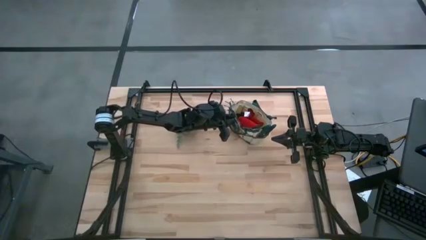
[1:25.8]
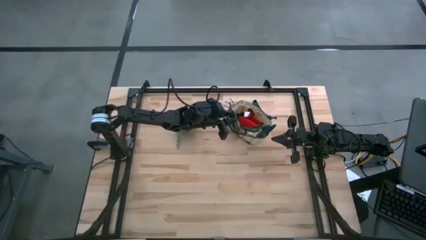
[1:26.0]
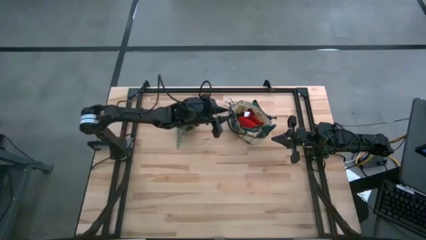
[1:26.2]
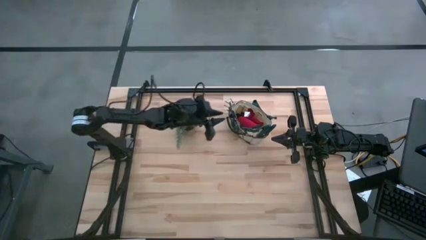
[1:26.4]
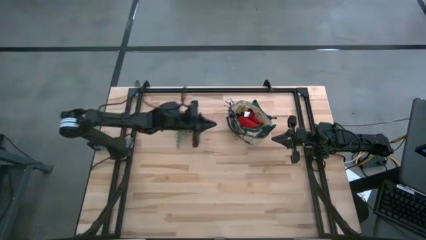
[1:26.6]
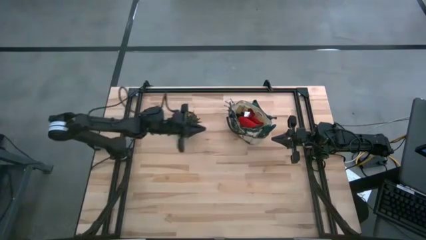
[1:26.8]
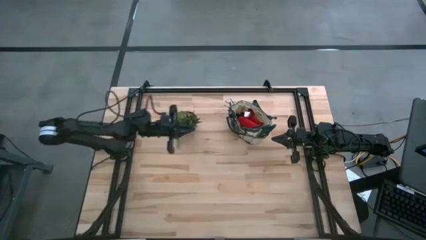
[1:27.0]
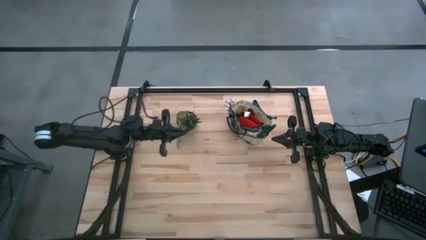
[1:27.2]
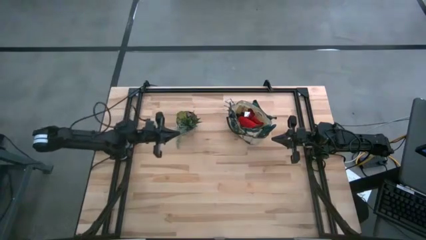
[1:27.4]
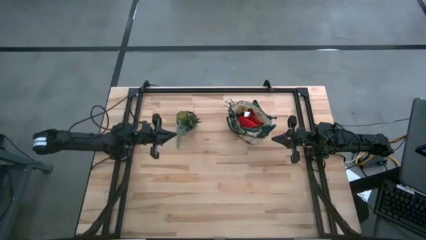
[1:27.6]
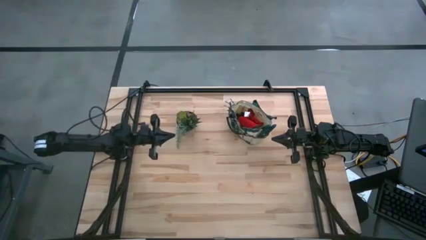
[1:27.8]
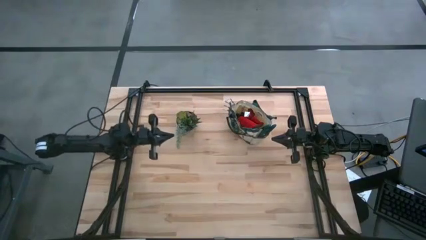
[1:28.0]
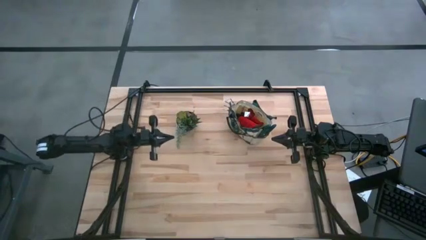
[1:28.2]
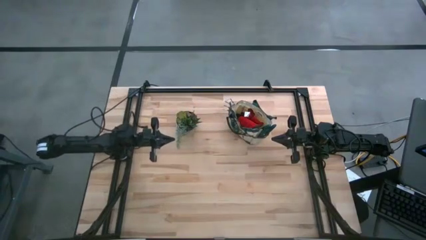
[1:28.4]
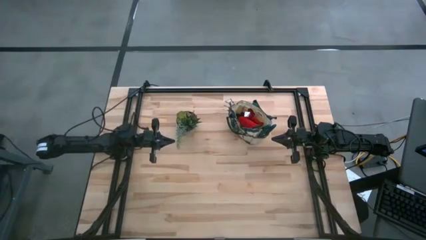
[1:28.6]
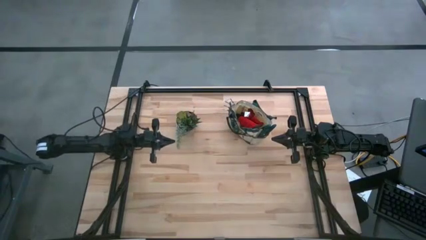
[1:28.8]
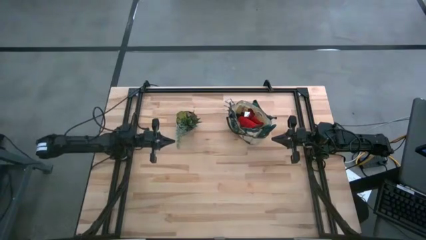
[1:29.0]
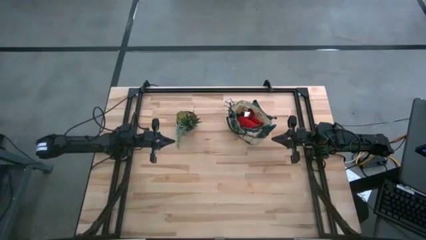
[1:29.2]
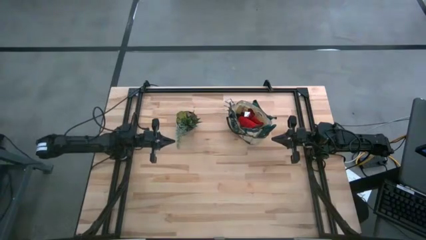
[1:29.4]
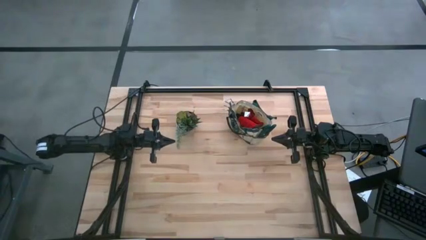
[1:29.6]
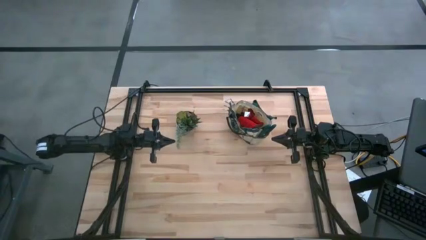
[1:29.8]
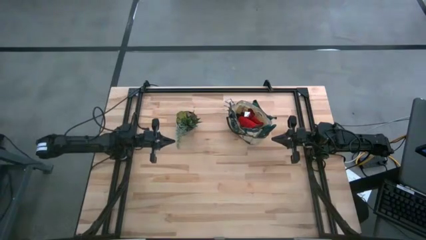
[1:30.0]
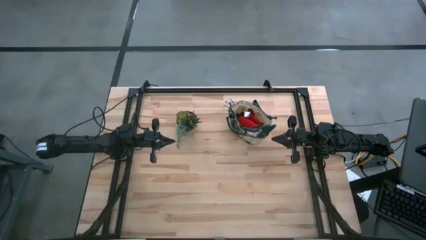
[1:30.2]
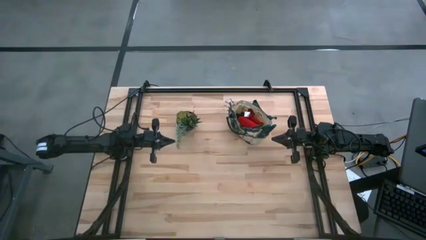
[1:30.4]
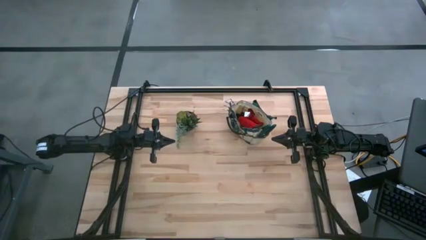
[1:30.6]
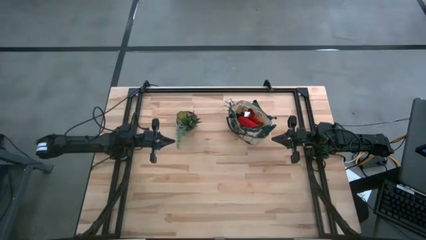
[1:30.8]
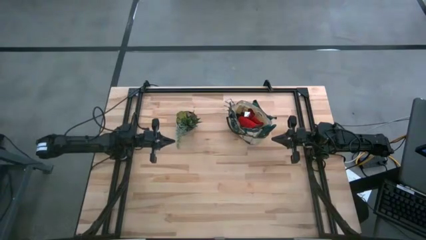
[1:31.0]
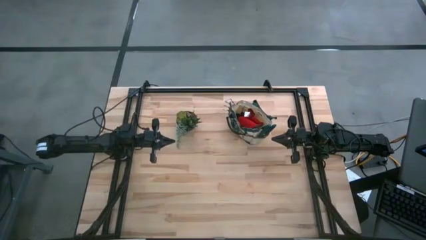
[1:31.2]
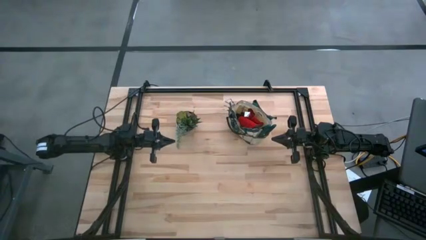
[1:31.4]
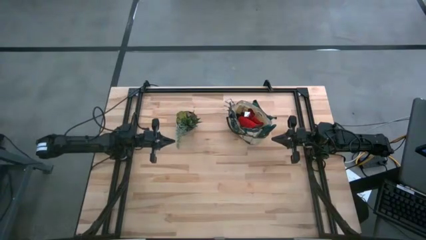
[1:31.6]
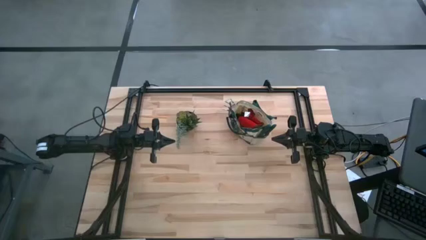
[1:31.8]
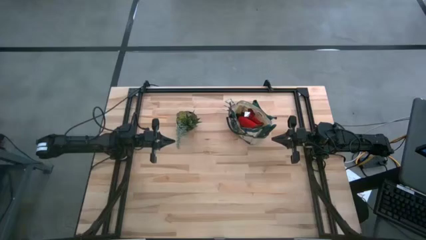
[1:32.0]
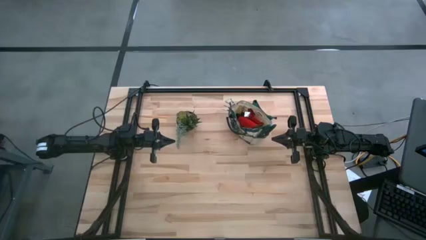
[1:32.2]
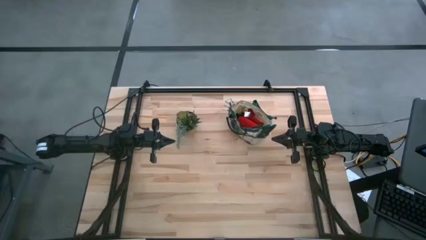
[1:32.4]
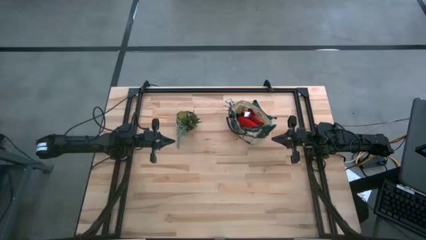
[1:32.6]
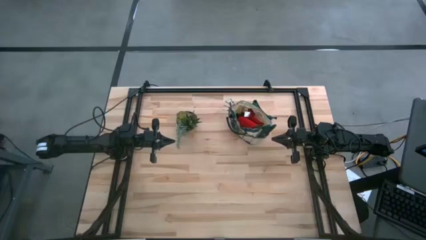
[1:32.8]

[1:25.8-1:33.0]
Task: Pick & Place Garden tools in Gardening bag
Return to Home Position

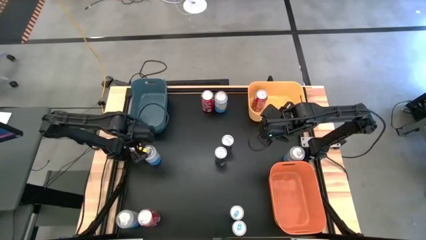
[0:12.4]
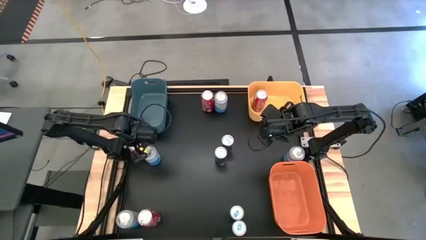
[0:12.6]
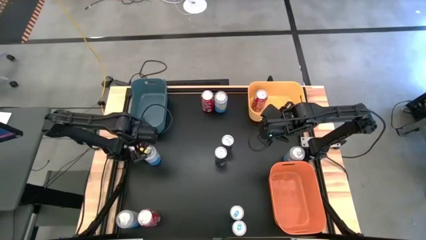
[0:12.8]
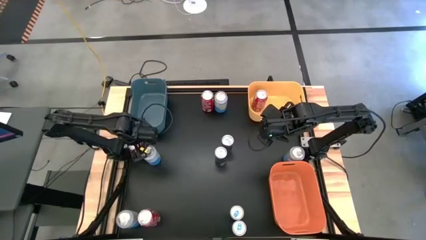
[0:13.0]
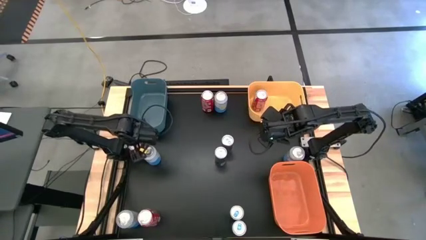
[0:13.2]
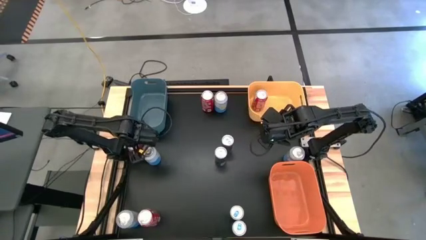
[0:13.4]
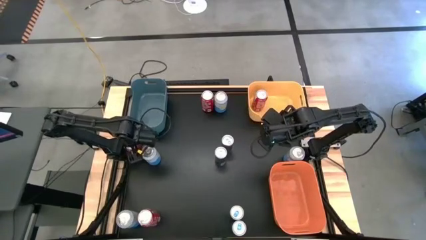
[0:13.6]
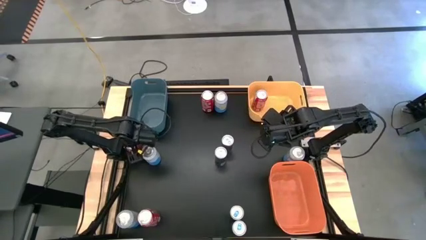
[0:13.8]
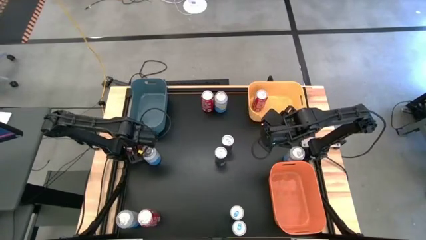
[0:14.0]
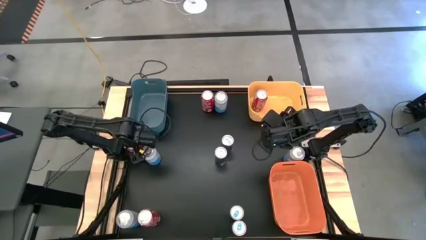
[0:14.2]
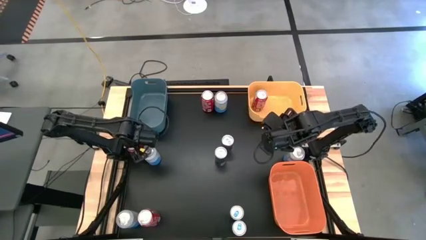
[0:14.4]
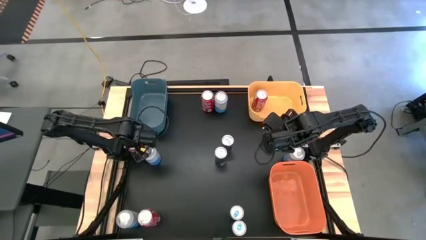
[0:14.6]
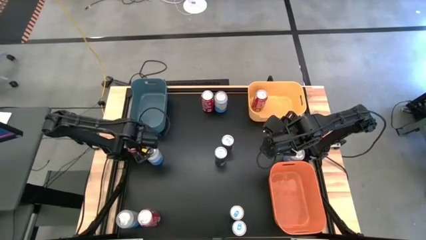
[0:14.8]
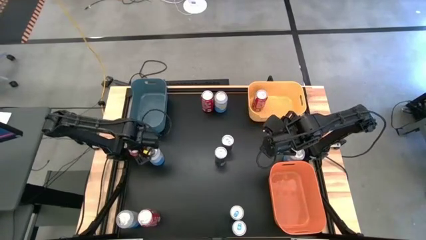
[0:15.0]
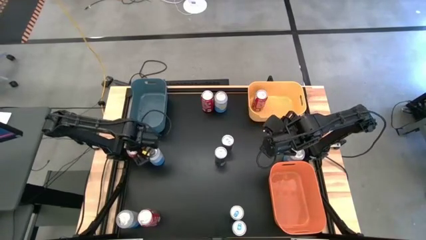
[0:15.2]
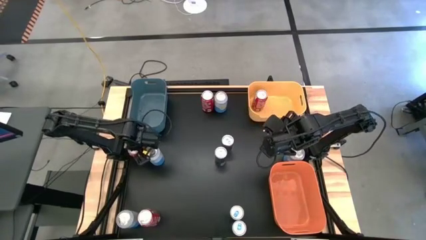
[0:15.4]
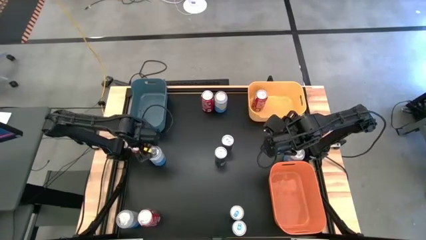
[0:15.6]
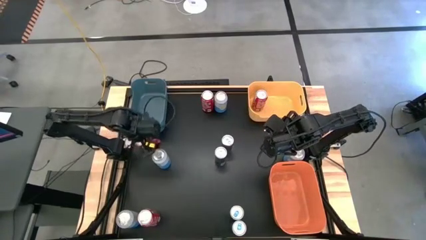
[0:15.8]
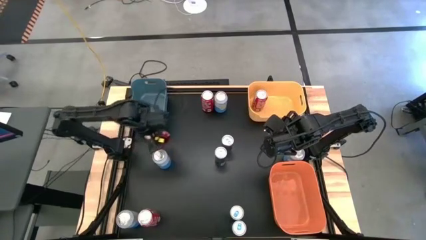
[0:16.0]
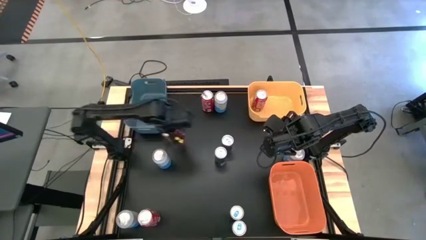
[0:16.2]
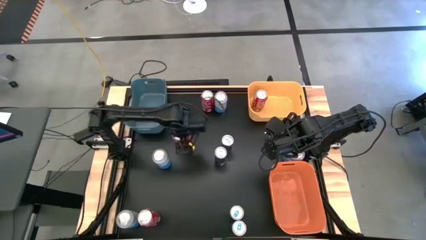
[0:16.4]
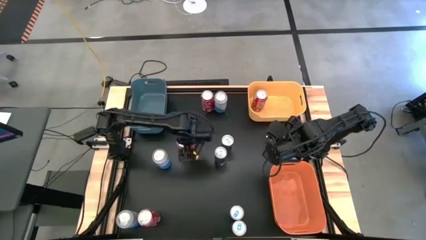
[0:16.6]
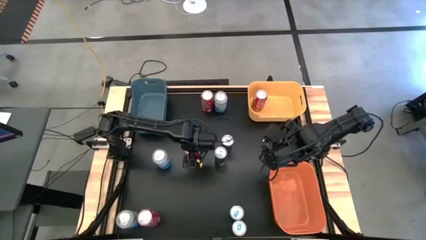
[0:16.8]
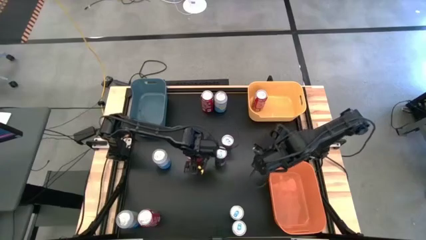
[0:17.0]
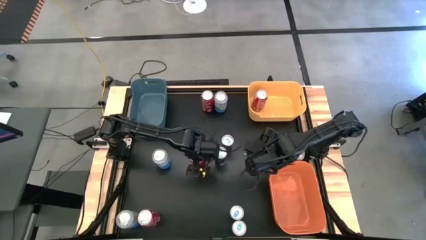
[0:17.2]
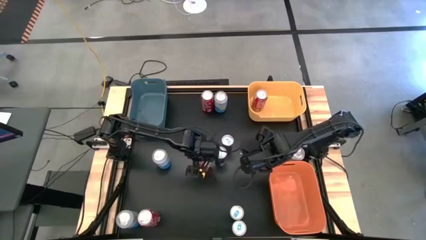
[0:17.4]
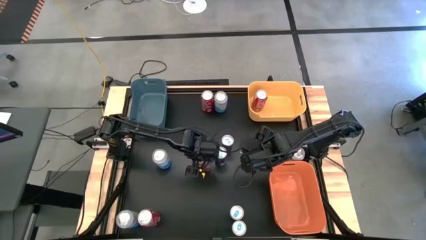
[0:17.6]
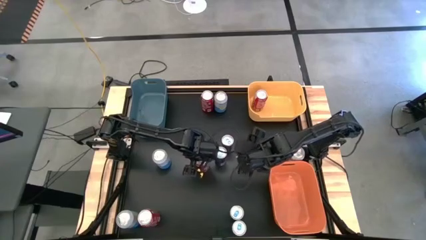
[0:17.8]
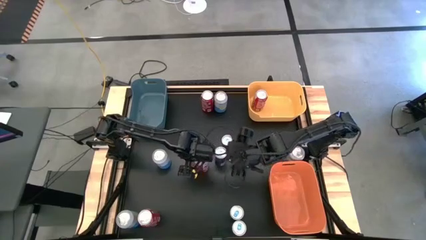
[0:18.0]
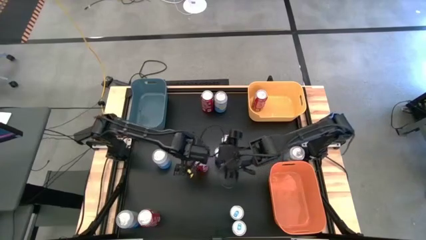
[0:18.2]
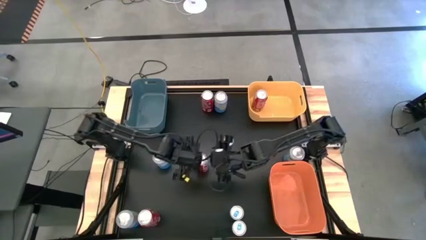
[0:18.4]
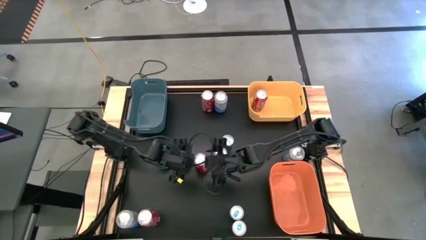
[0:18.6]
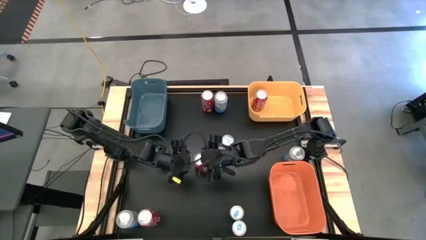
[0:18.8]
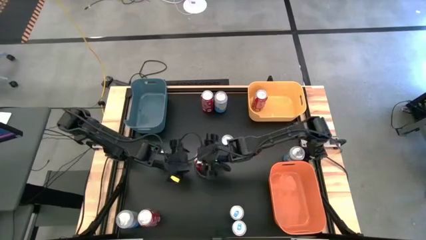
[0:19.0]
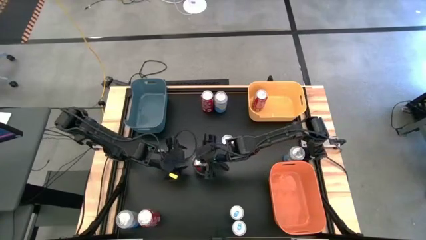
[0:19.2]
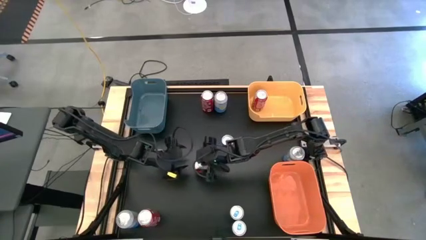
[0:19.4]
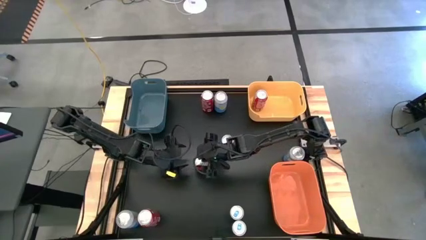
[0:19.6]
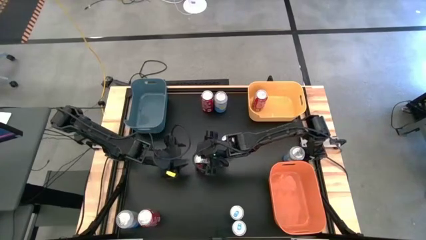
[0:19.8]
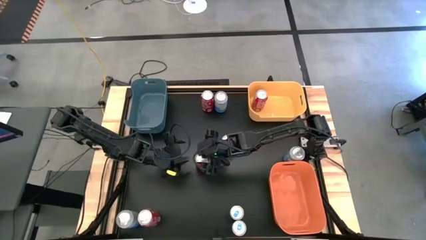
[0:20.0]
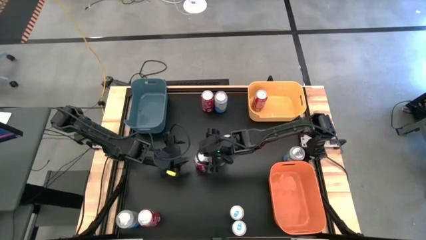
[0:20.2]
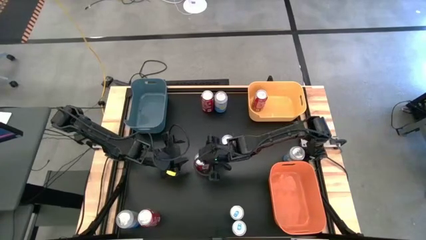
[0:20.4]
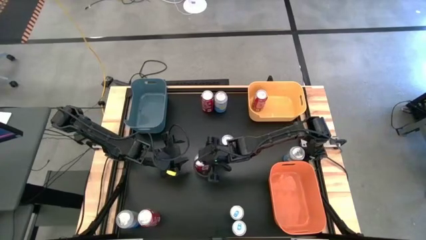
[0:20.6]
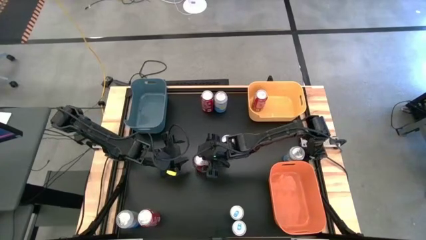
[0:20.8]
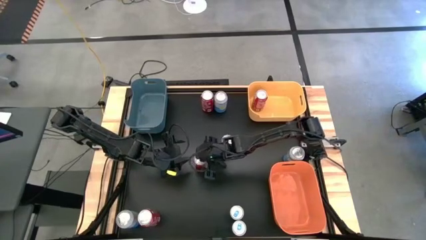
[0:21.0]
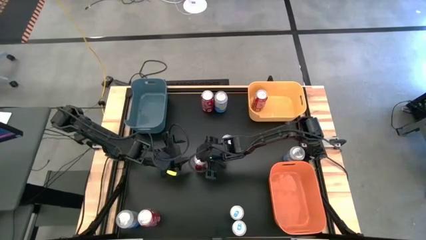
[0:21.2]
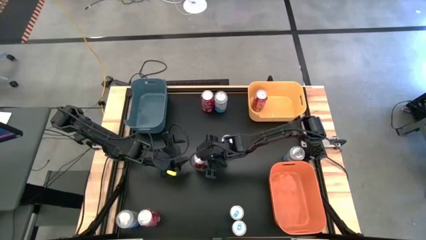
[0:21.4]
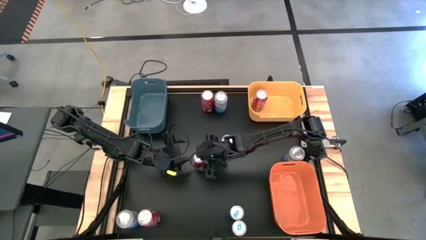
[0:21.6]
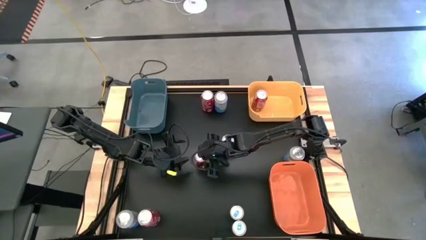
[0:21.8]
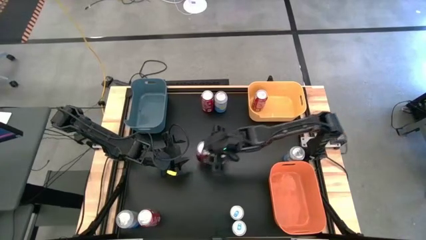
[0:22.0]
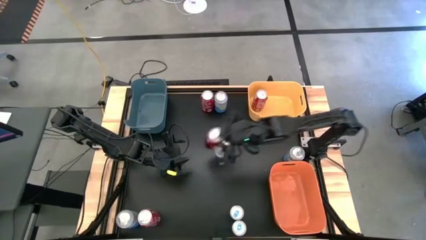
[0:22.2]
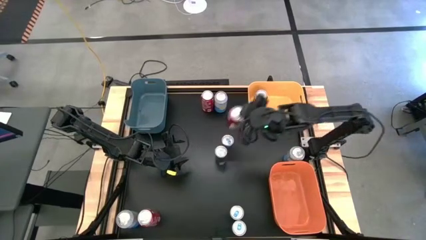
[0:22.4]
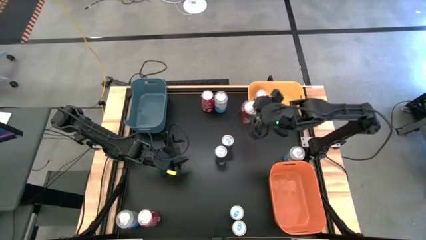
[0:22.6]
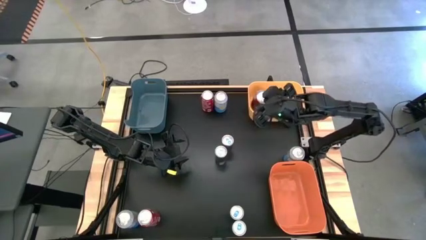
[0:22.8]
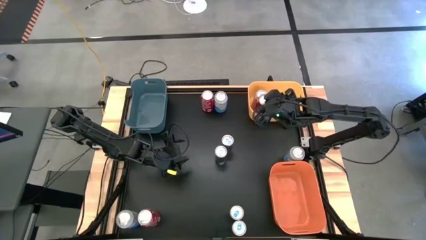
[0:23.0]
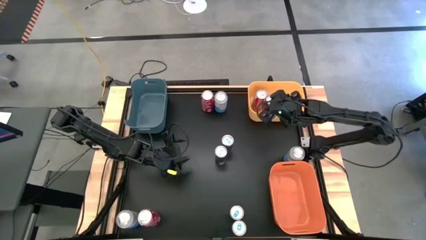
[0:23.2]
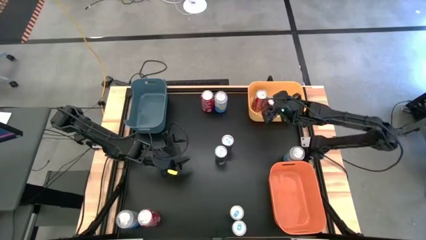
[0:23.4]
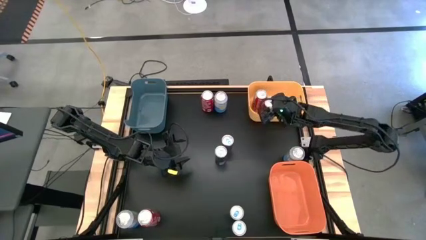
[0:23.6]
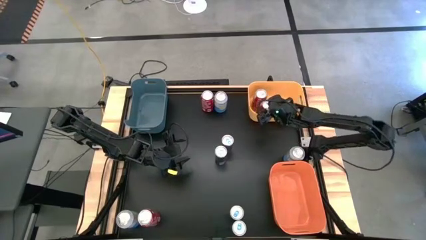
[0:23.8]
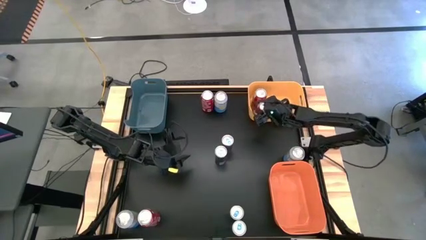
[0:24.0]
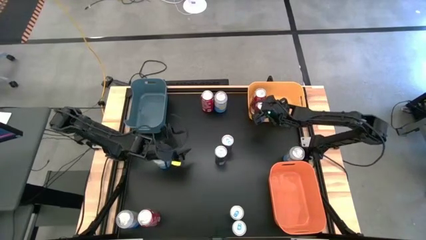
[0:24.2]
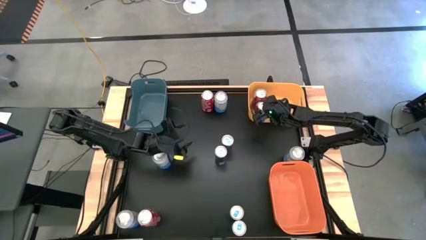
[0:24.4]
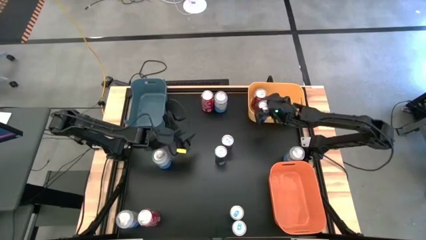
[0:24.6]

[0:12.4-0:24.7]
Task: Sort soda cans
Put the middle left red soda can into the yellow bin
